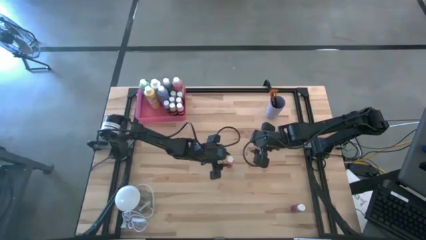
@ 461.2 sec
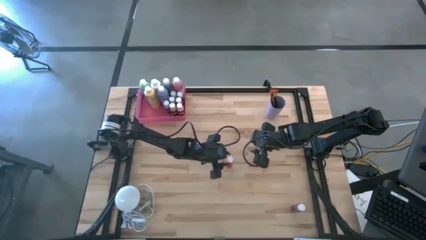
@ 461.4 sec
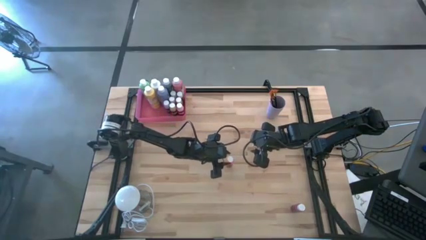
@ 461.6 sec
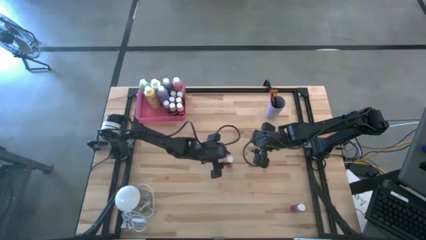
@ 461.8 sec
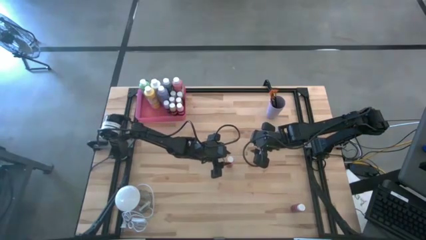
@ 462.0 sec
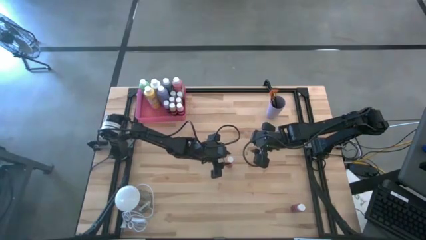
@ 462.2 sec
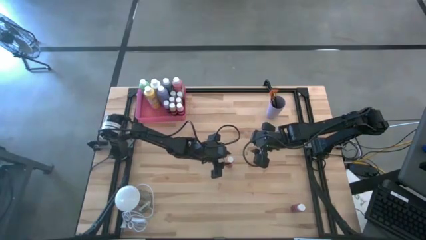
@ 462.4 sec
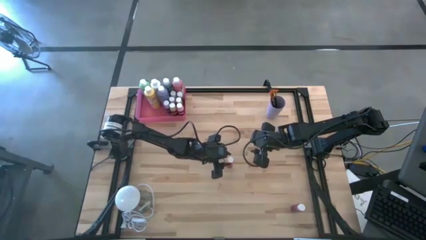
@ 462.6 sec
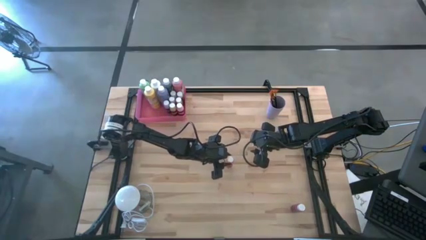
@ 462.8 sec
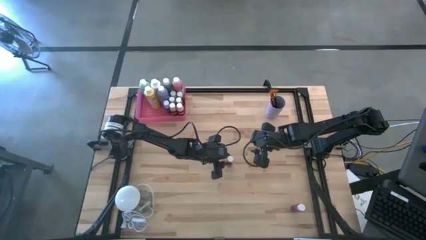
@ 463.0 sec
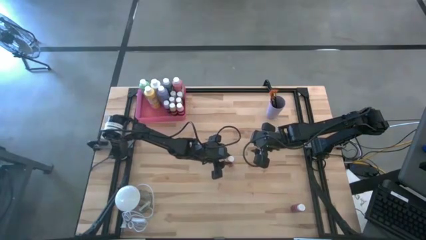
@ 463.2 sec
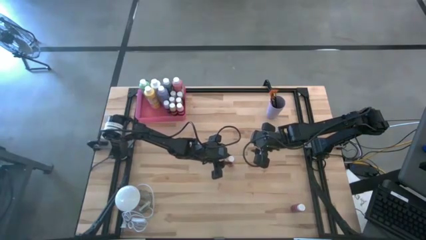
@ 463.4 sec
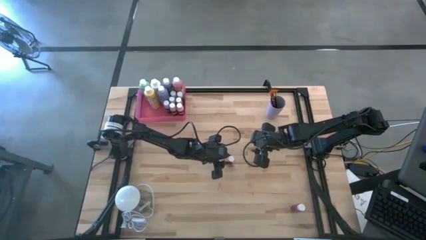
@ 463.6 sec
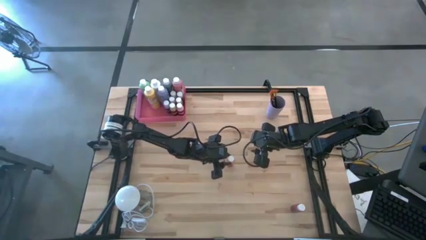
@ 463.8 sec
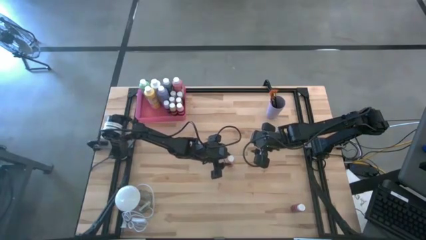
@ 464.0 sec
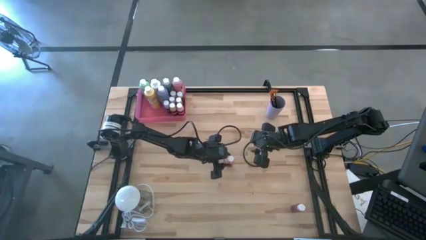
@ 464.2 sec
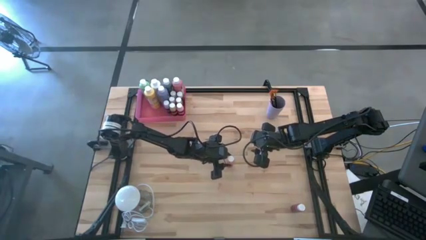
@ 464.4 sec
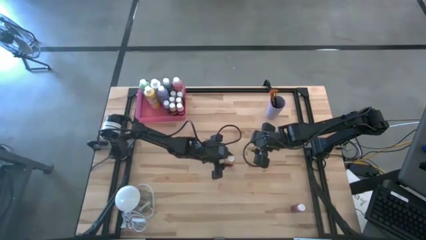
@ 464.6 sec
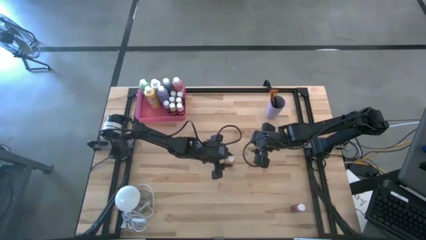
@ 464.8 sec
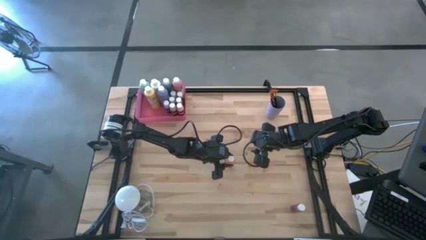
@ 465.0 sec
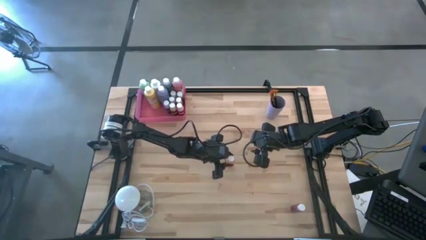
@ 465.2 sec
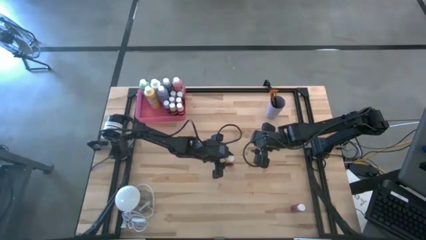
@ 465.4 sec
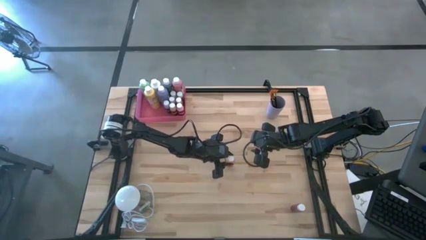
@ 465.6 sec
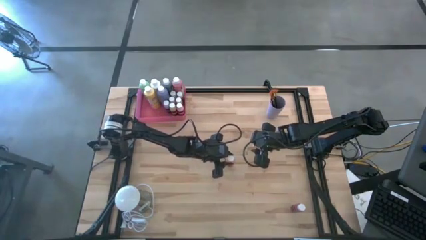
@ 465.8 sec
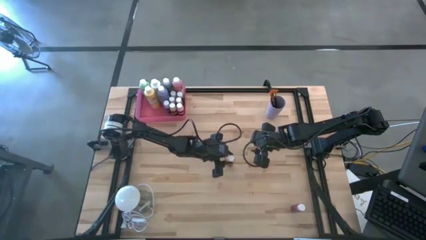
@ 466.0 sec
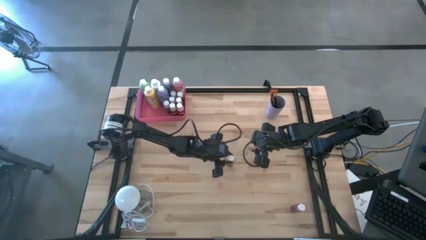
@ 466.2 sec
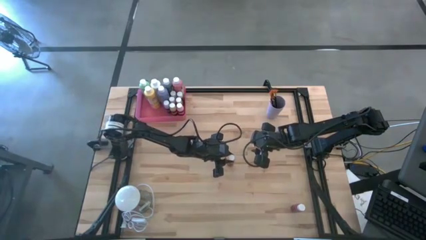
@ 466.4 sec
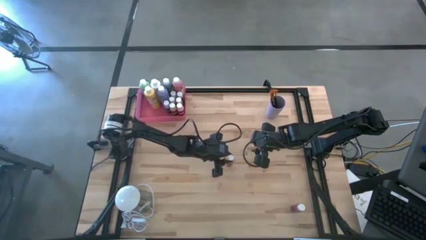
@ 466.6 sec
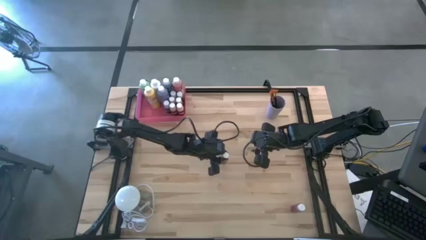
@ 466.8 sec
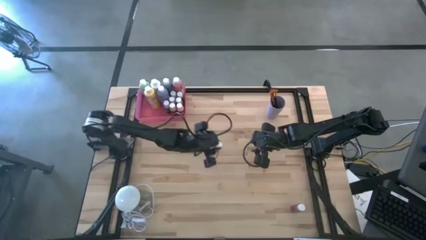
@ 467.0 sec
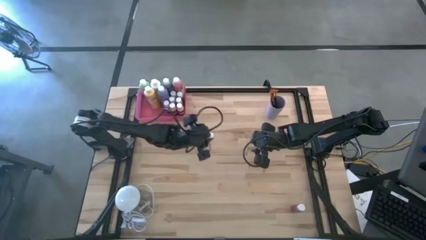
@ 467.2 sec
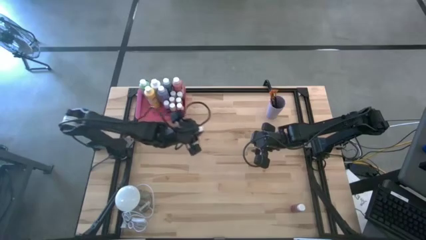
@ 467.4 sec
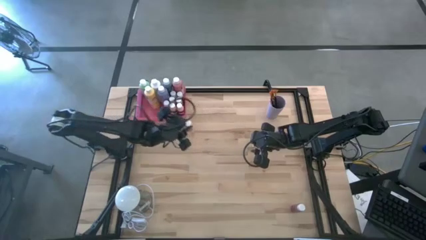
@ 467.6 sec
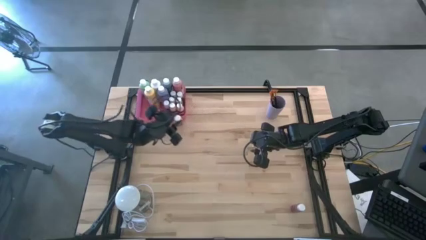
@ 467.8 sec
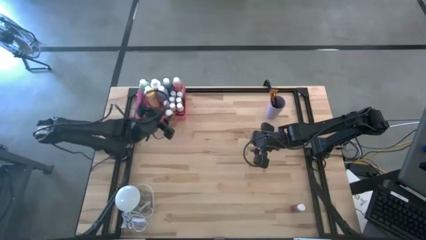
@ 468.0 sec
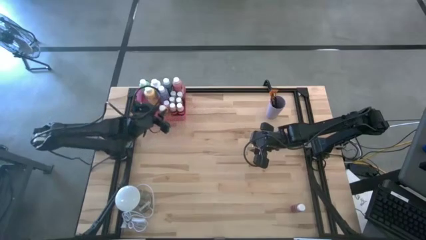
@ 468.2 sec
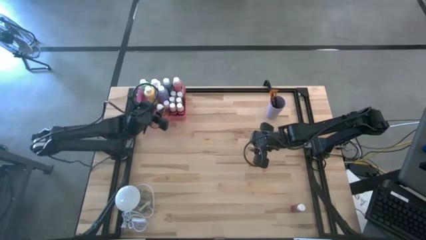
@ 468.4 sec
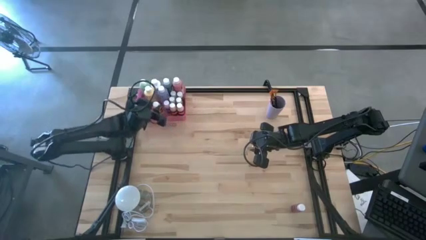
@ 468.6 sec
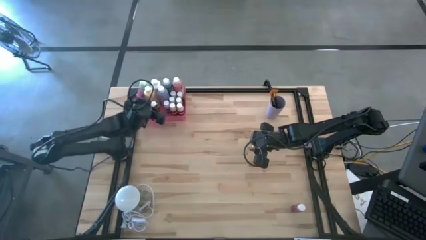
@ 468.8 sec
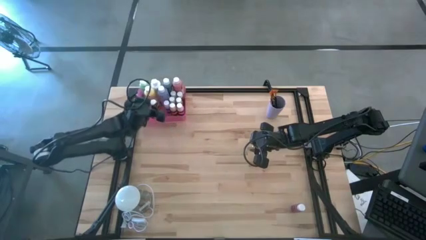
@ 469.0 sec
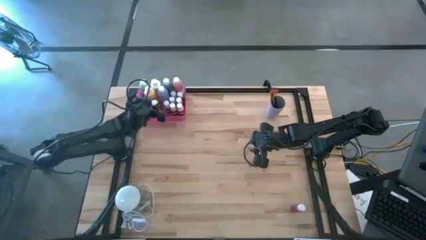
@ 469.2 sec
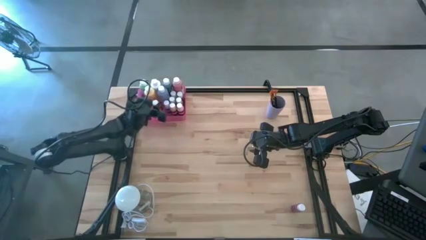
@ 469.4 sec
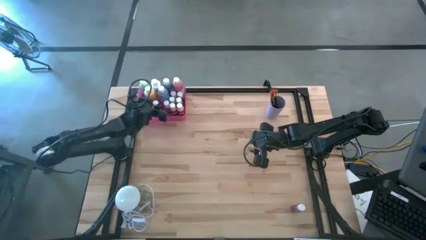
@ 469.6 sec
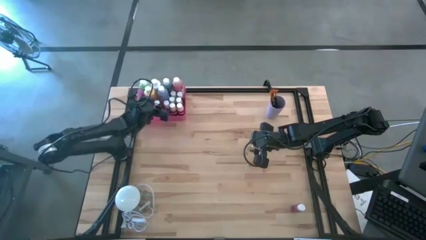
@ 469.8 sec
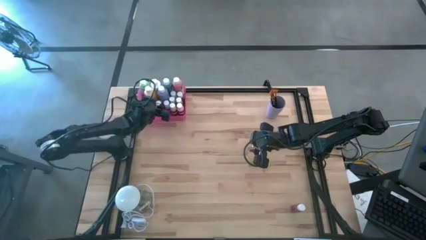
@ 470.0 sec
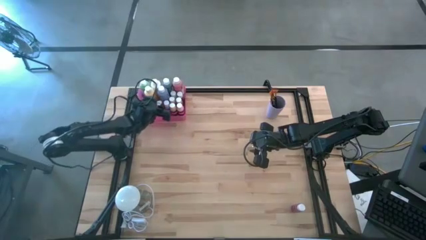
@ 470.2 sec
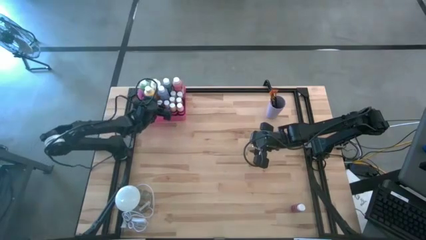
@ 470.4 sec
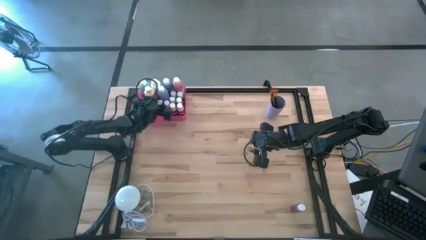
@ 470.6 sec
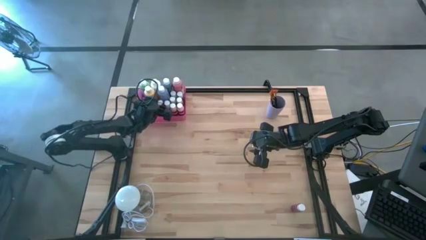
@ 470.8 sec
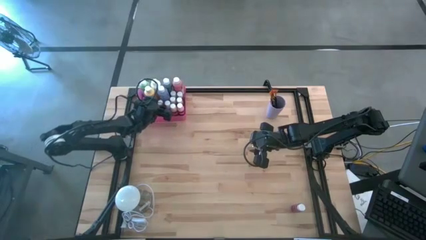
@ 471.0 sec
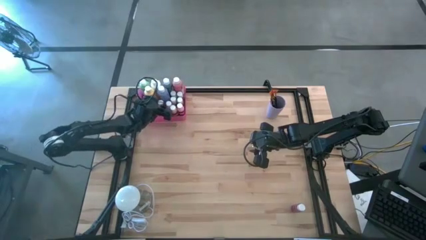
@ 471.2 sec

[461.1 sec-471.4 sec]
Task: Pick & Place Paint Supplies
Put the small orange paint bottle into the pink bin
